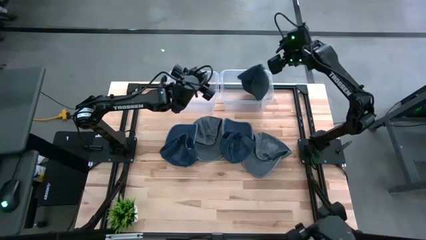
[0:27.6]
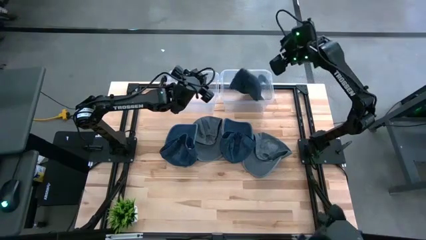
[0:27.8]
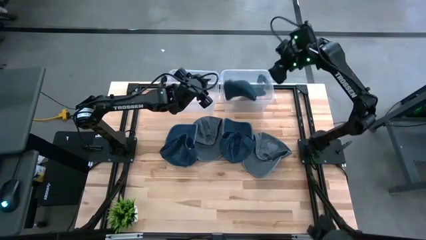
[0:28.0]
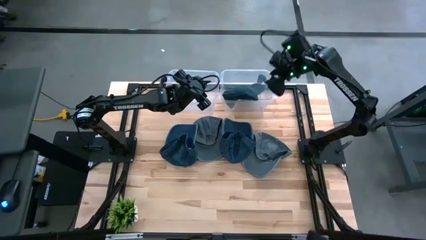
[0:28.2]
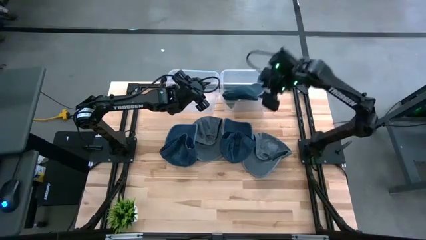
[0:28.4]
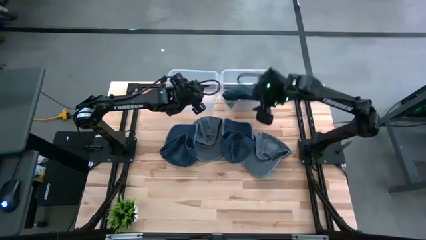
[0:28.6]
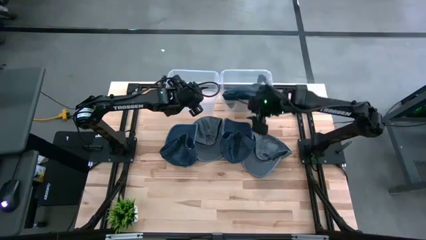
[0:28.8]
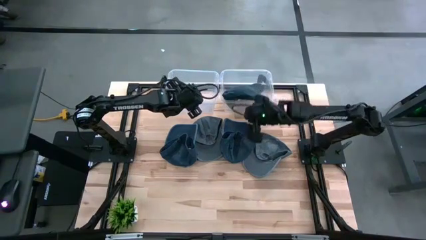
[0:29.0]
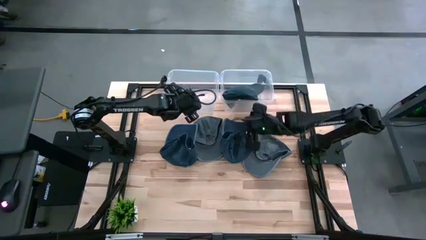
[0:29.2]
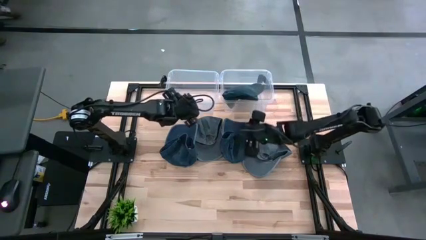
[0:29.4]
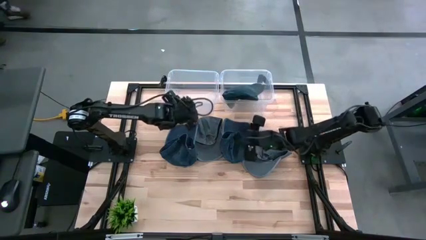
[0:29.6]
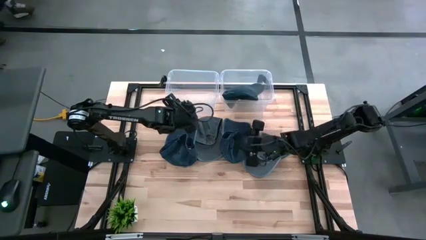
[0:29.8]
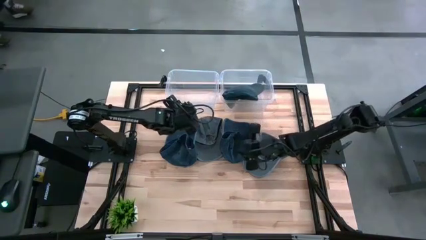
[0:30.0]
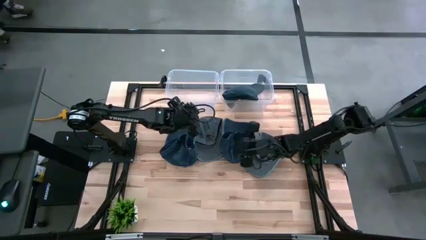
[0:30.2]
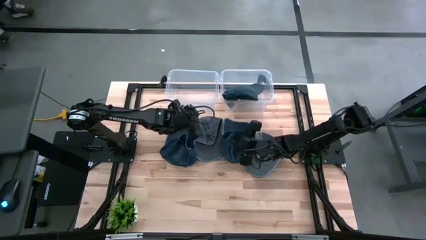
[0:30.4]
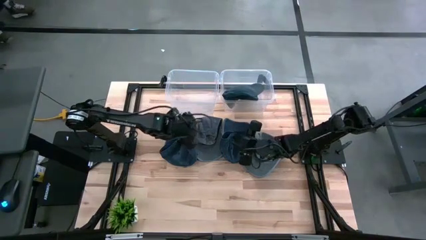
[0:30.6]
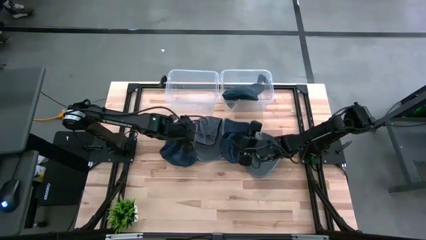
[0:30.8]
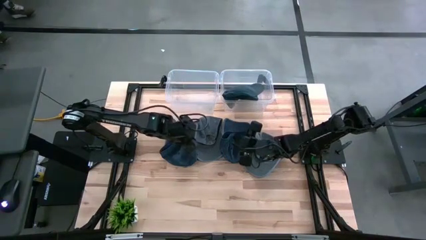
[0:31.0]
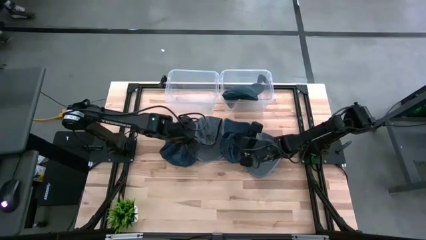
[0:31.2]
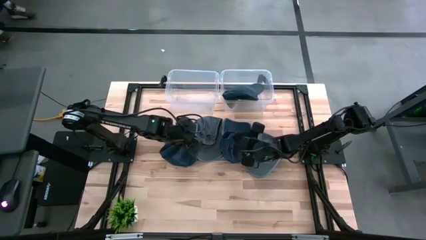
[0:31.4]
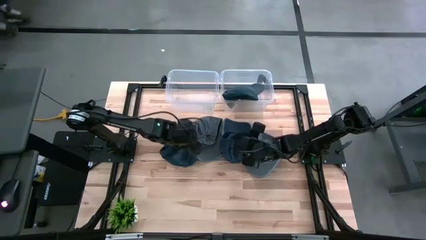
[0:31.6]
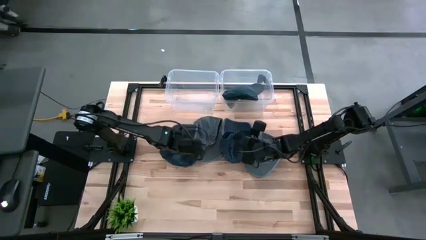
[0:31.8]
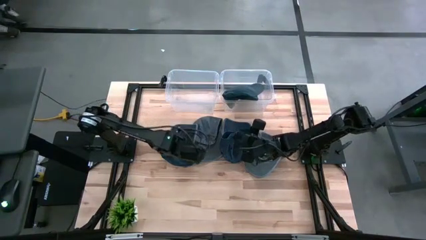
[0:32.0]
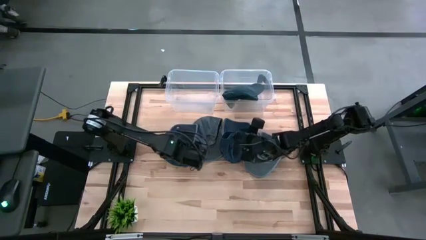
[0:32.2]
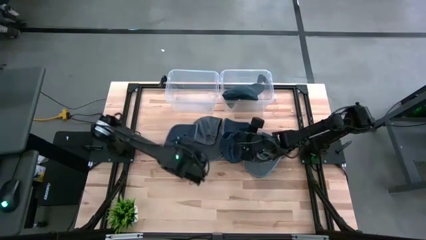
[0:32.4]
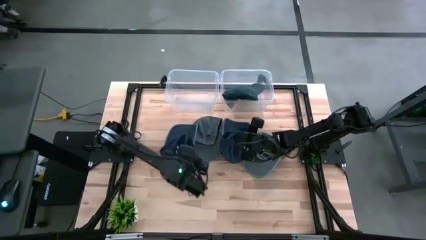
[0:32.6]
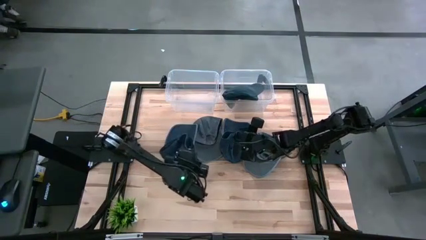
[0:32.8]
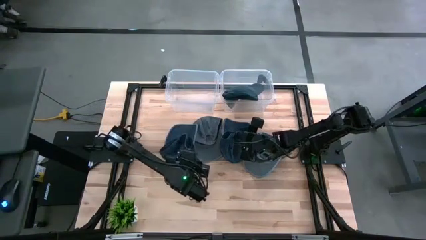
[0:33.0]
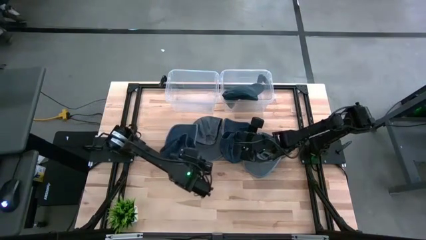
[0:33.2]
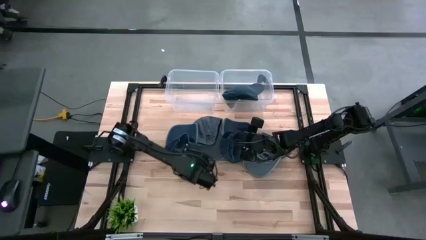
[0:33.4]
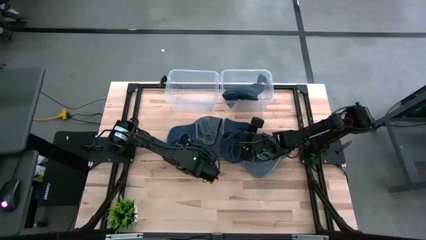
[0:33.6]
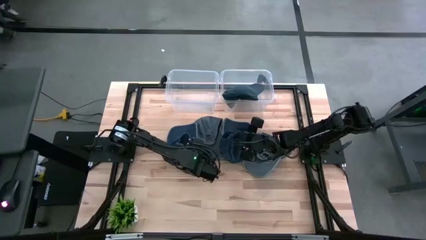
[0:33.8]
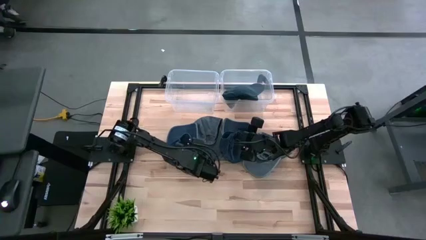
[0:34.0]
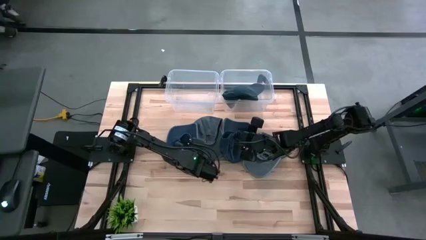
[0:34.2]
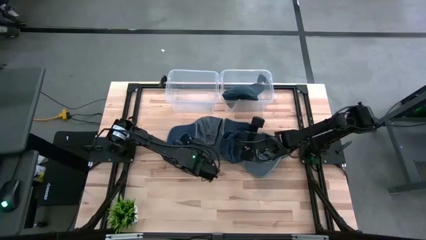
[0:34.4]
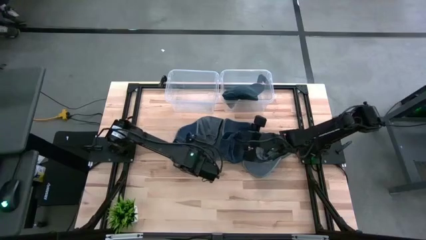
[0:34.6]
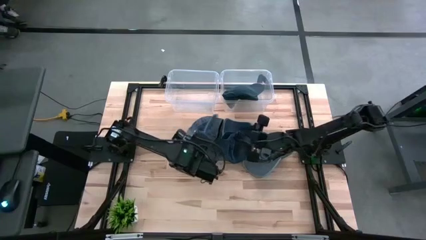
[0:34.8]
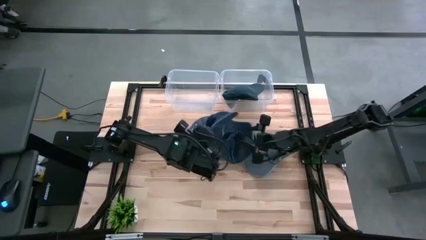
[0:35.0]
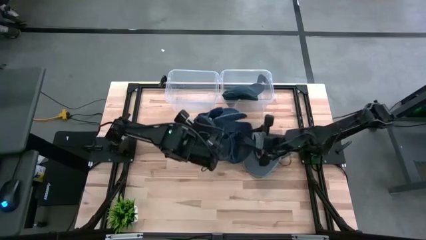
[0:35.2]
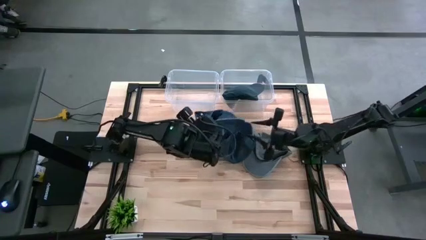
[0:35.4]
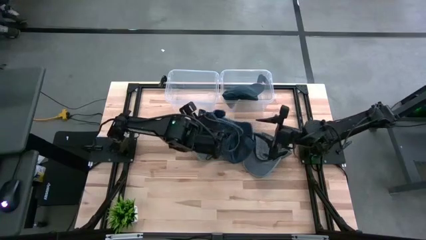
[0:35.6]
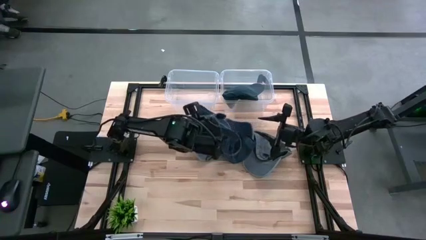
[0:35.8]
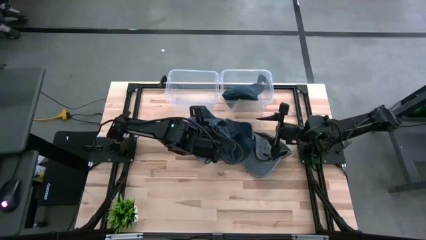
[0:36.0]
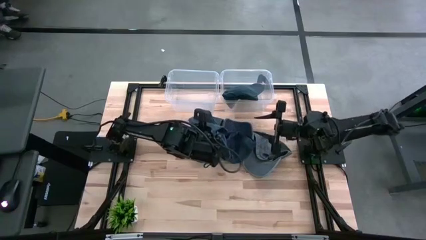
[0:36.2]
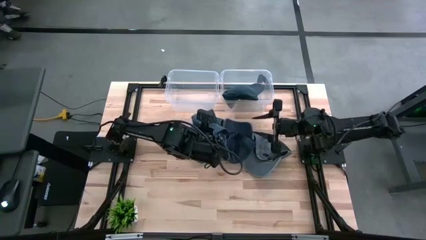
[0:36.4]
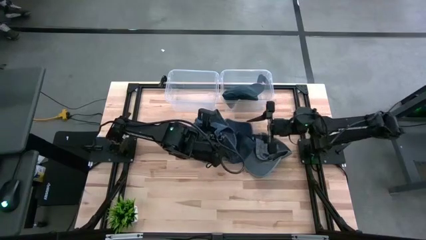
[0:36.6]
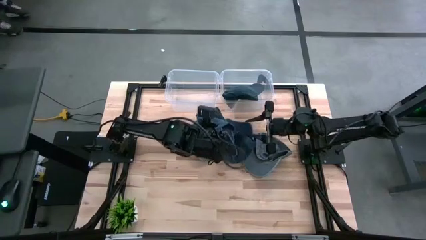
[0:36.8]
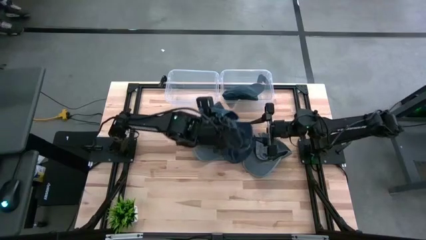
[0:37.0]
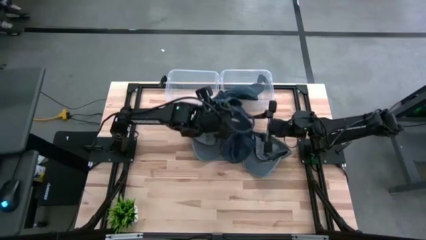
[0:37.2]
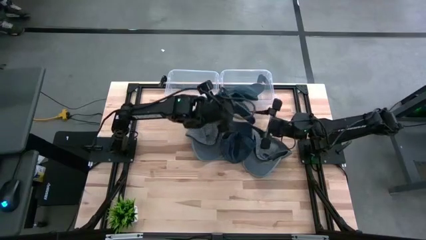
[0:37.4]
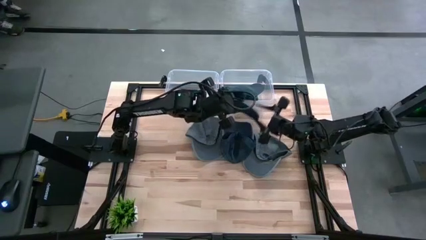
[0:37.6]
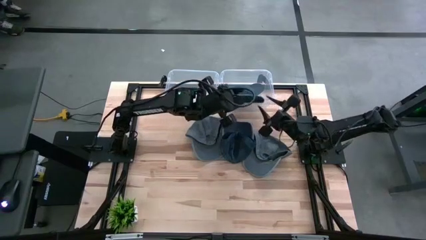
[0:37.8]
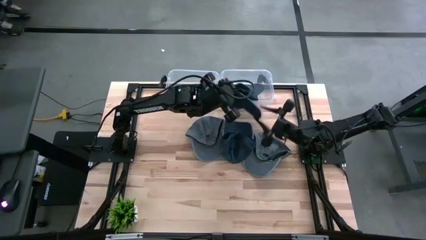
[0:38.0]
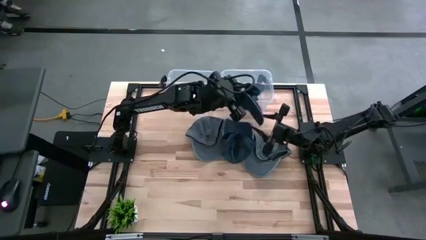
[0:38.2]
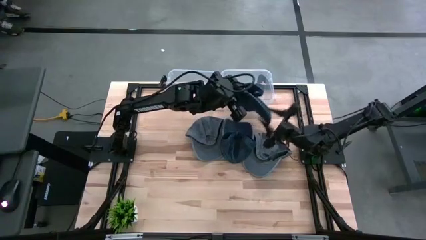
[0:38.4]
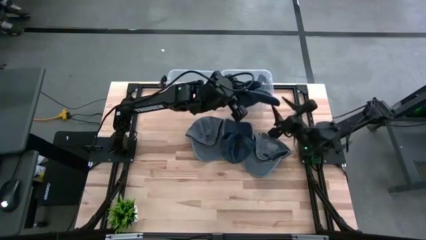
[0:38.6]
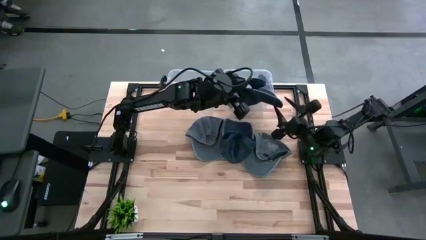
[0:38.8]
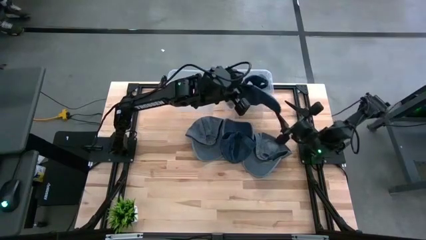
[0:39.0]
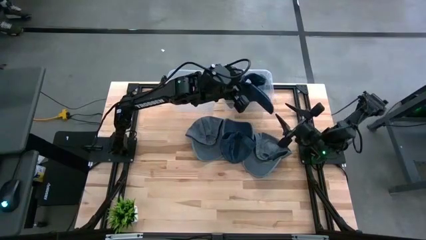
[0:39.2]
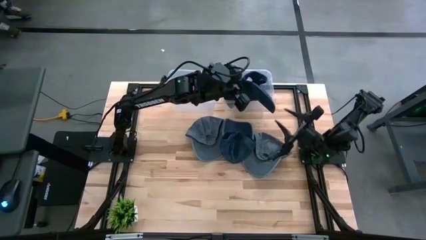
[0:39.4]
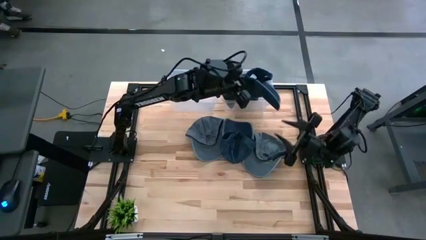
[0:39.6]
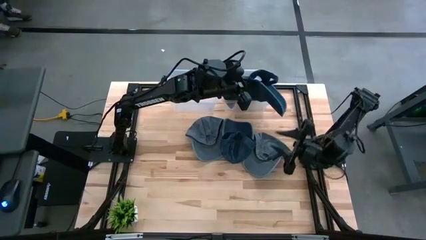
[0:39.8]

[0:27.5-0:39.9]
Task: Pick & Place hat
Put the left blue cap into the right transparent bin

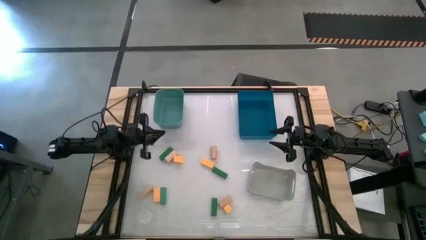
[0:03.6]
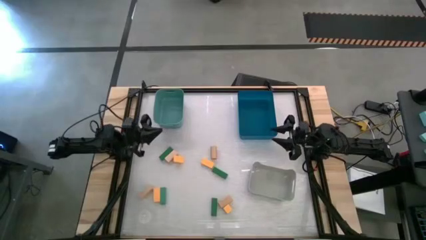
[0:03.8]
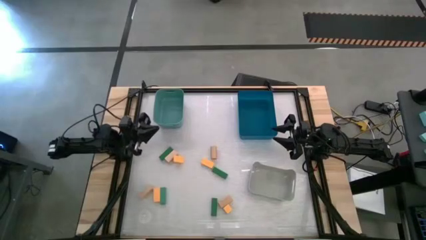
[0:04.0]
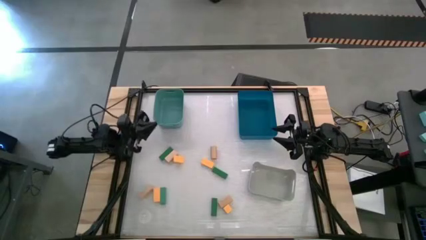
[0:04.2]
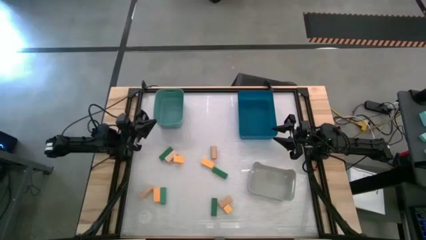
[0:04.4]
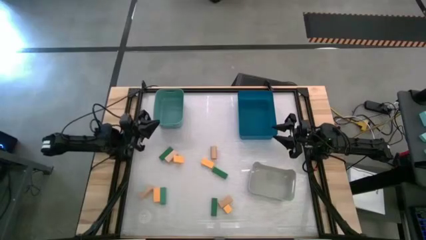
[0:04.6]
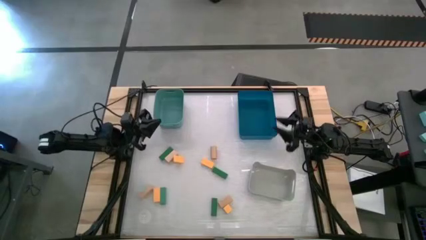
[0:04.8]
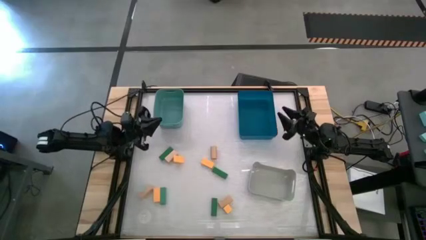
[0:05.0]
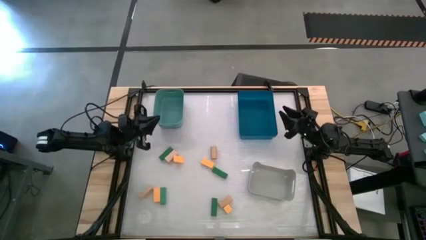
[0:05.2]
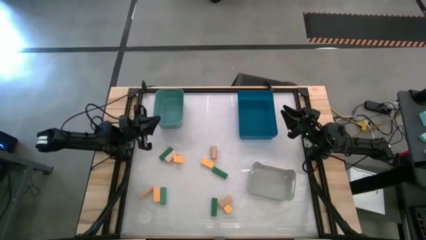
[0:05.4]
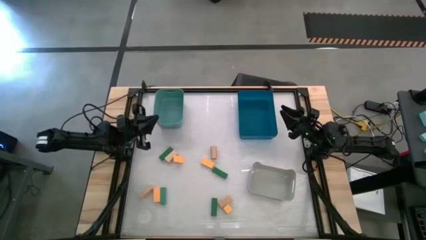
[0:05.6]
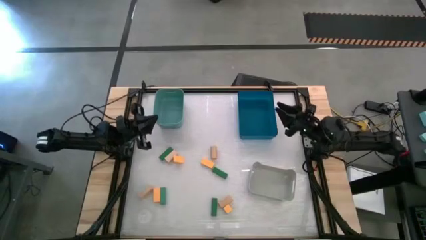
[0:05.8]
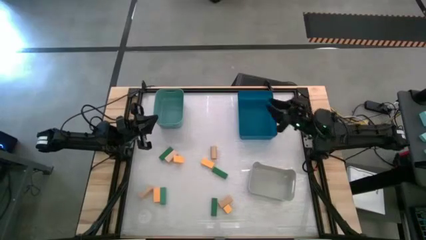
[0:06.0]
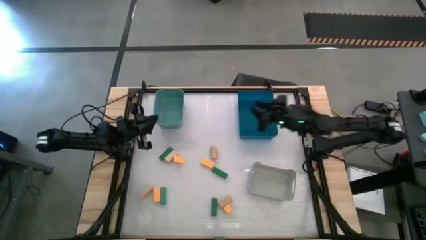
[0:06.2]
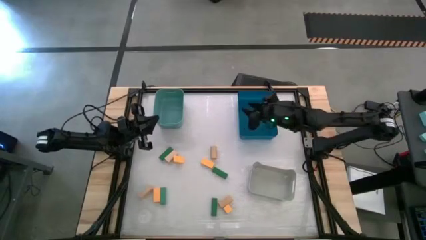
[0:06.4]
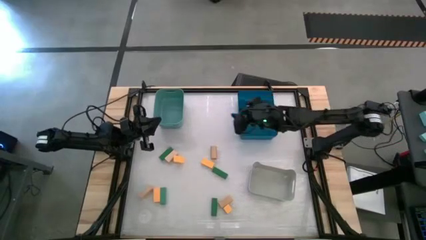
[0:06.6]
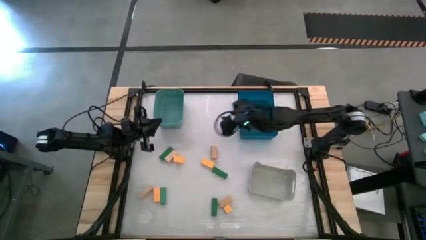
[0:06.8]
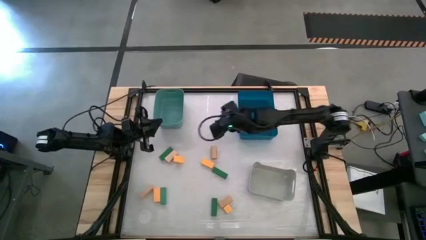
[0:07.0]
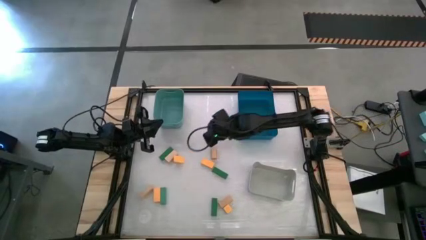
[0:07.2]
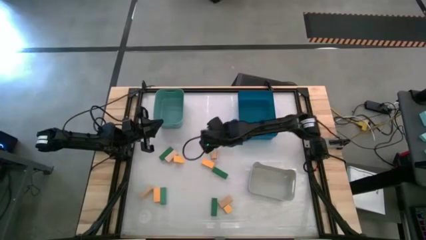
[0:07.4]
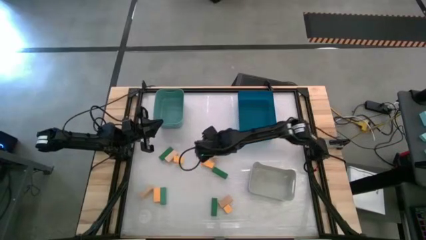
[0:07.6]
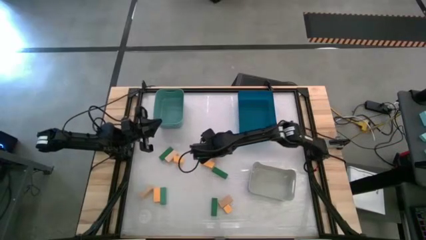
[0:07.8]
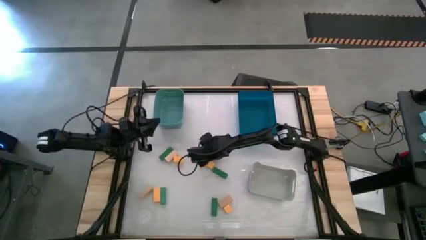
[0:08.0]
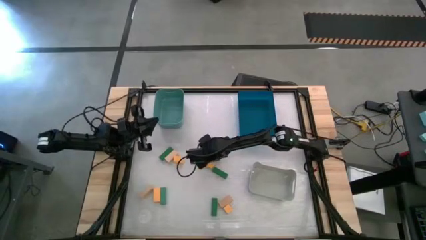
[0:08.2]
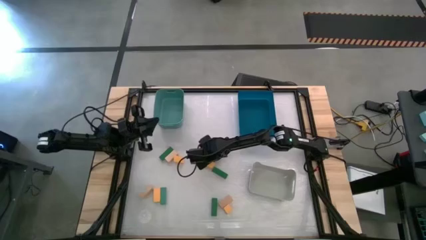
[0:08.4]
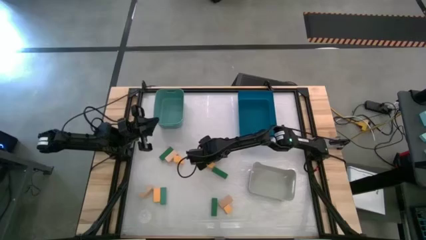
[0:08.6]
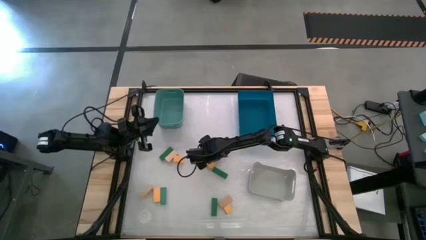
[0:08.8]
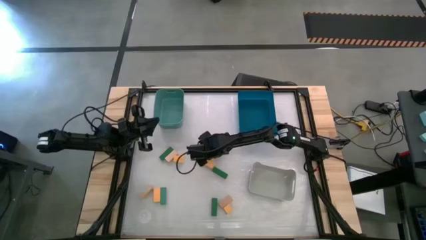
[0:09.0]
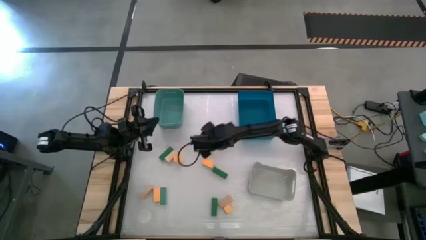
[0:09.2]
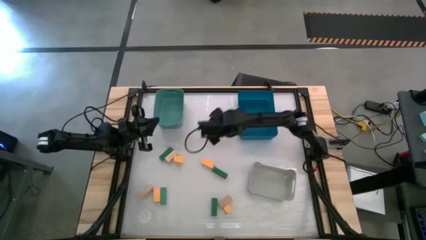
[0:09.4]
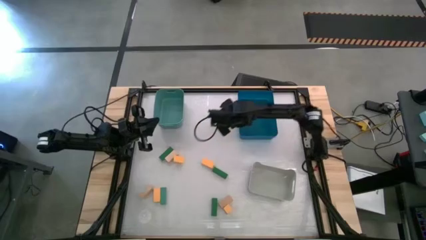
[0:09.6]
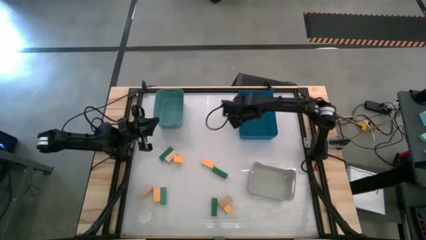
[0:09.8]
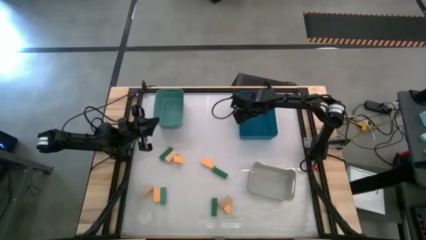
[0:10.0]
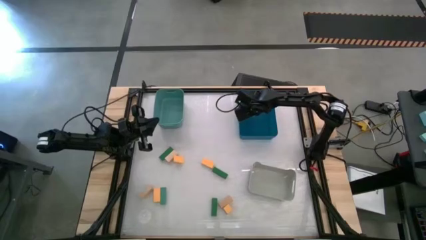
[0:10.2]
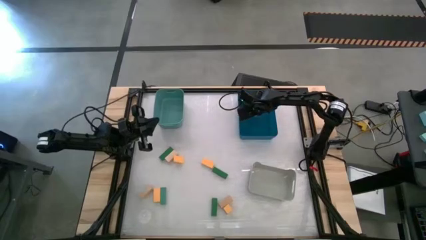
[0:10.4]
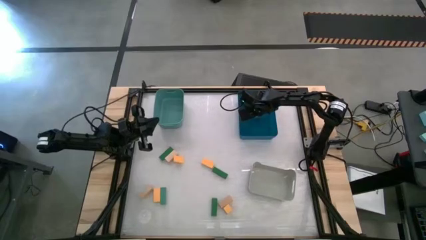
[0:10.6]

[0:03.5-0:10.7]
Task: Sort & place blocks by color
Put the brown wooden block into the dark blue bin
